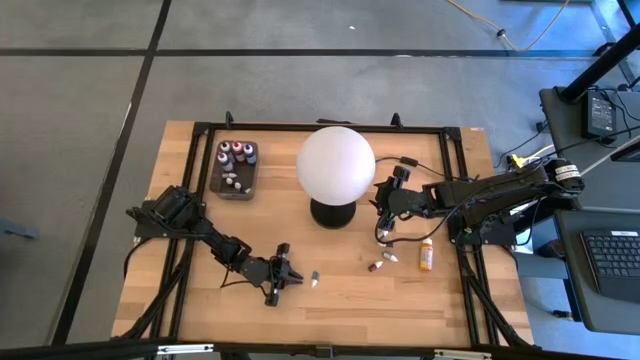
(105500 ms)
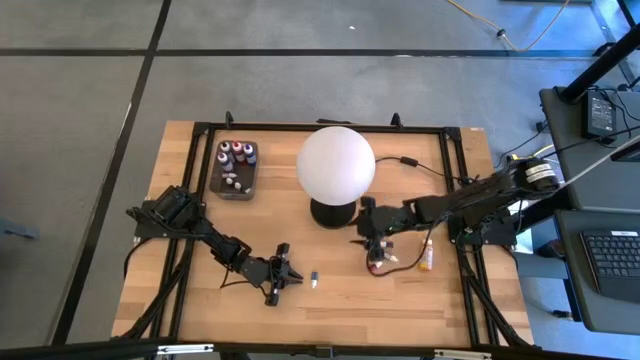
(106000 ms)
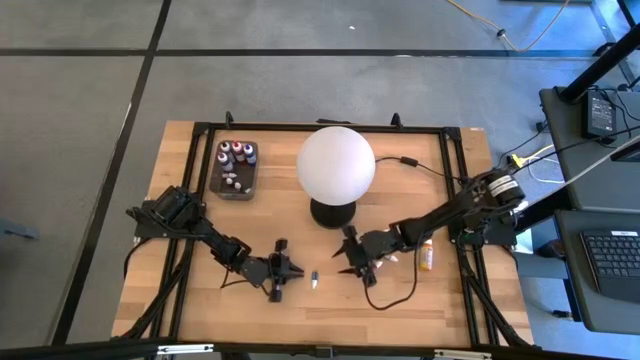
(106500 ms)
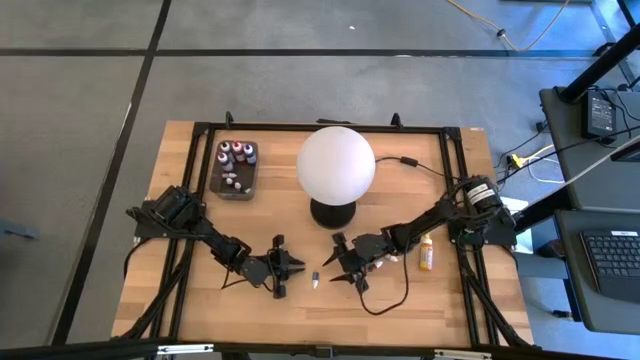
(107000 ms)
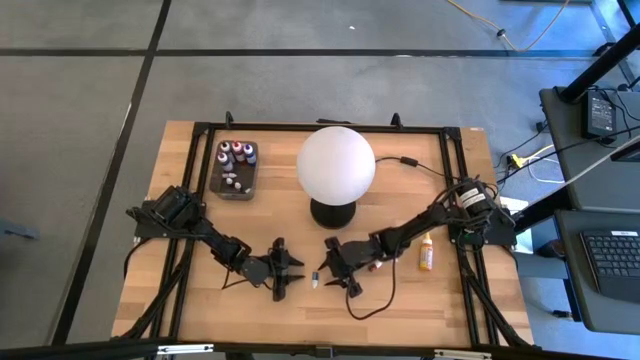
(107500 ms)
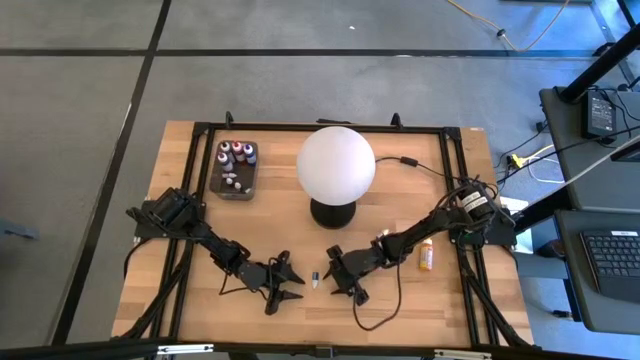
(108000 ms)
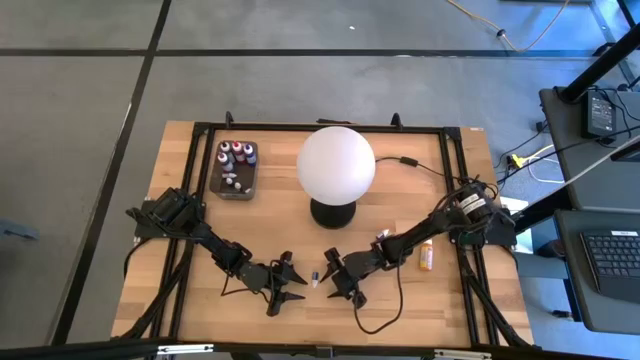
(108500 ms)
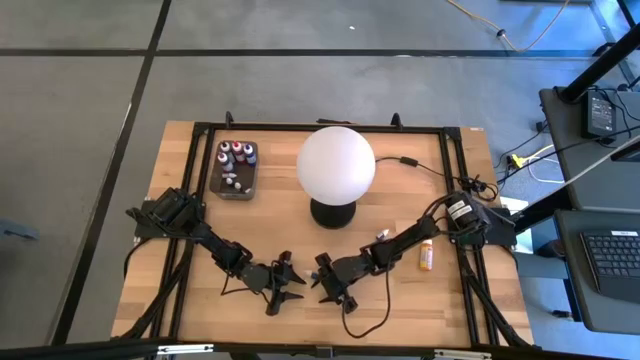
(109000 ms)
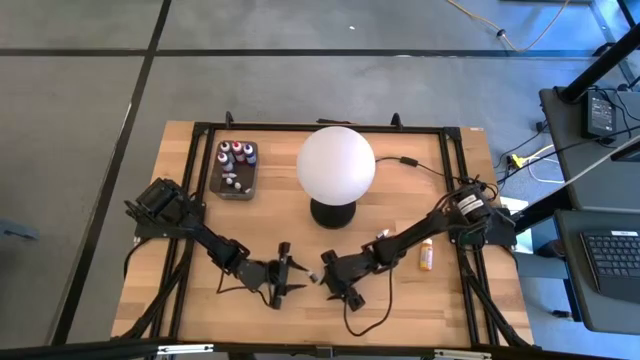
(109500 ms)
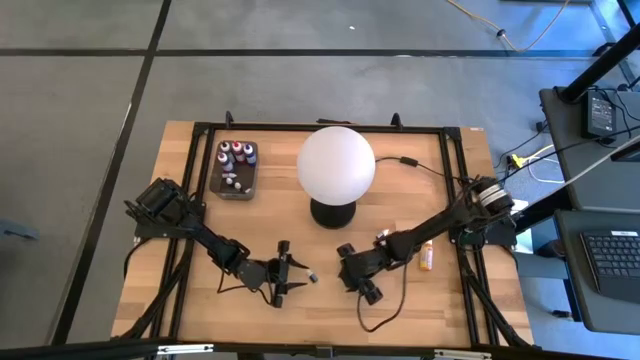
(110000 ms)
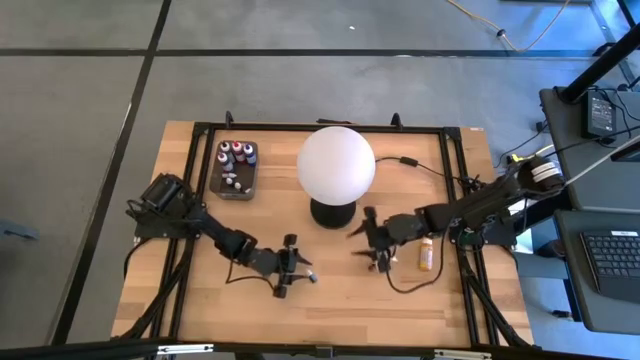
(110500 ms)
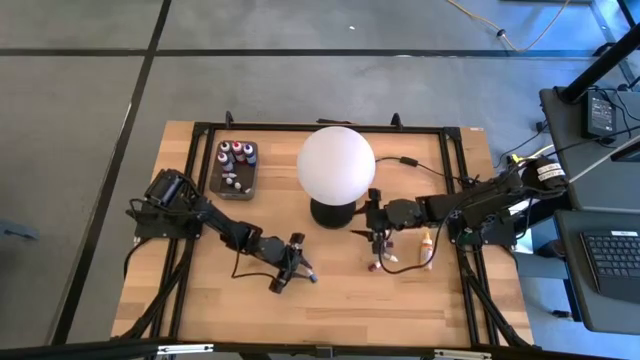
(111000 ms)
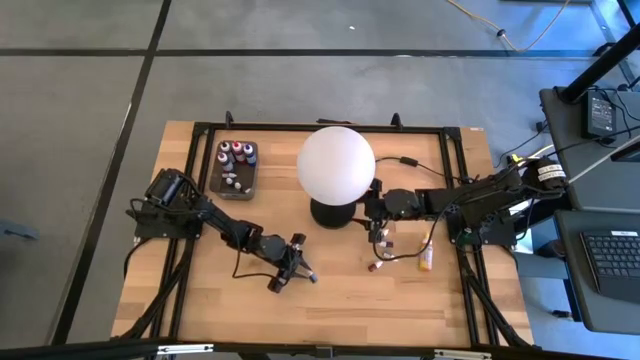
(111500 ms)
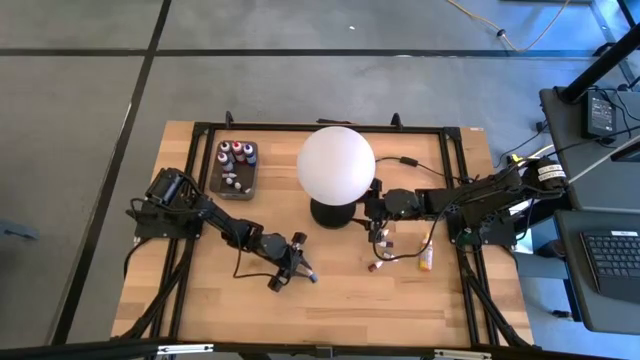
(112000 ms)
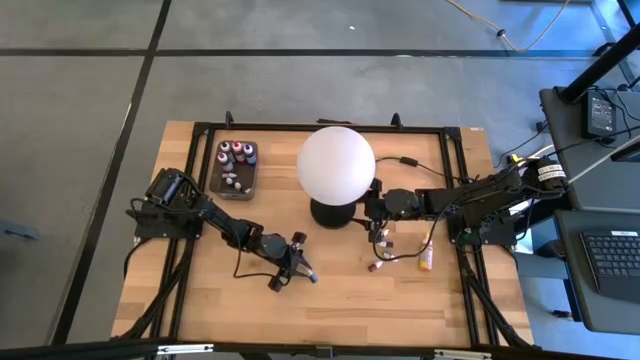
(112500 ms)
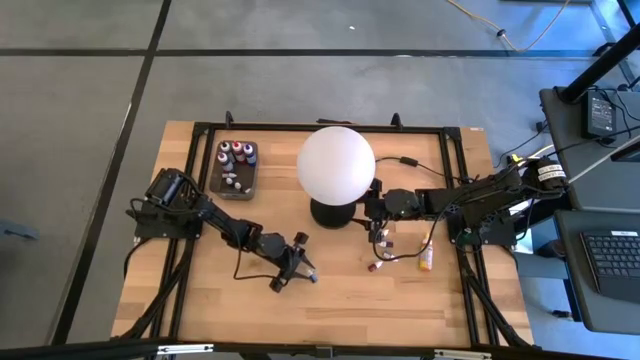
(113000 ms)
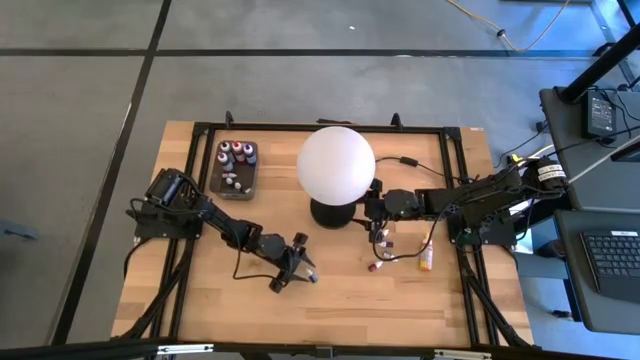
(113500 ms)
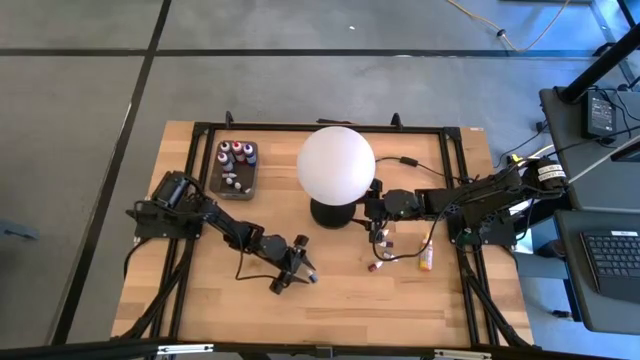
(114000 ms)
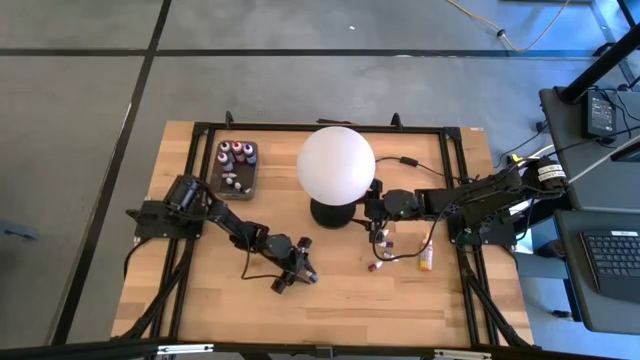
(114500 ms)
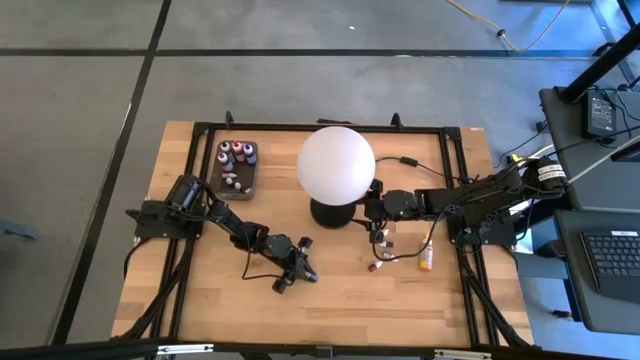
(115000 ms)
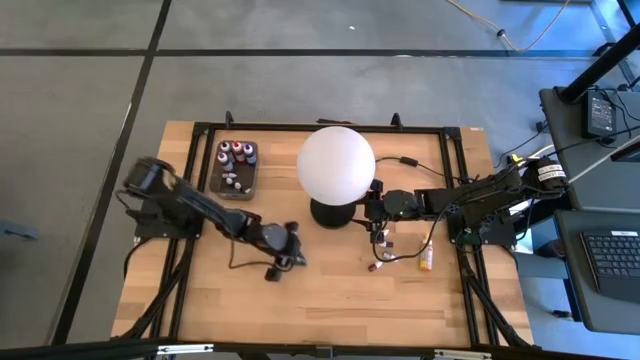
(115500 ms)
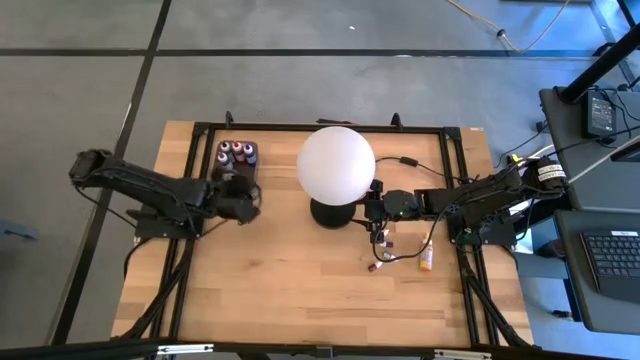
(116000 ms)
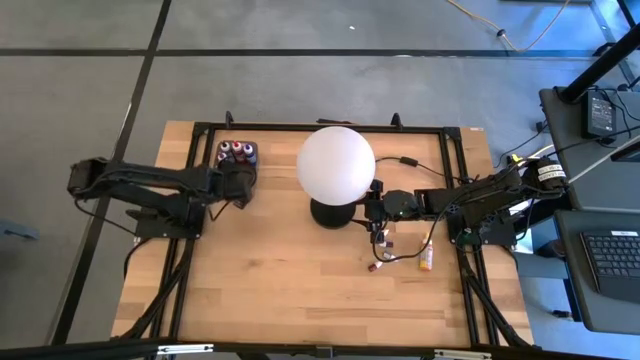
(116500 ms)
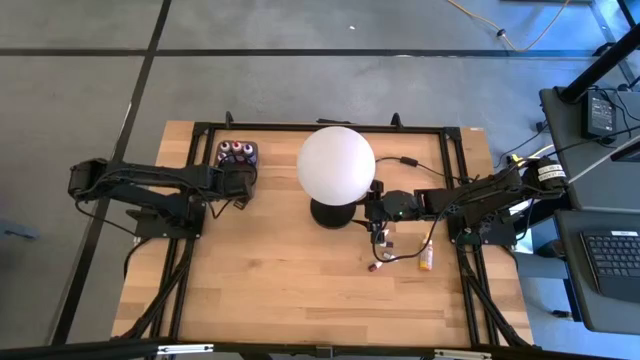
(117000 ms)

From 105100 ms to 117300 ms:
Task: Pick & Place food coloring
Put the small blue food coloring bottle into the black container

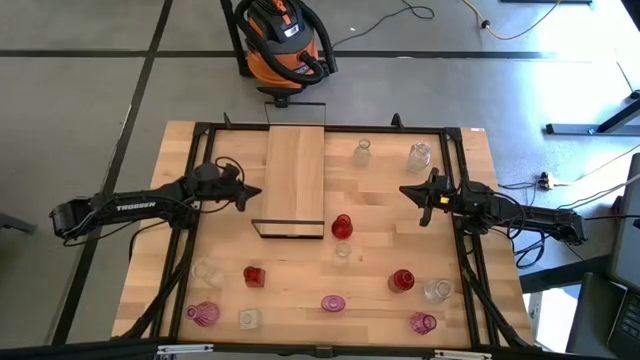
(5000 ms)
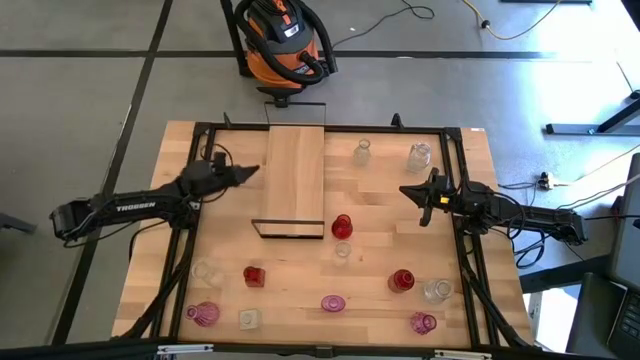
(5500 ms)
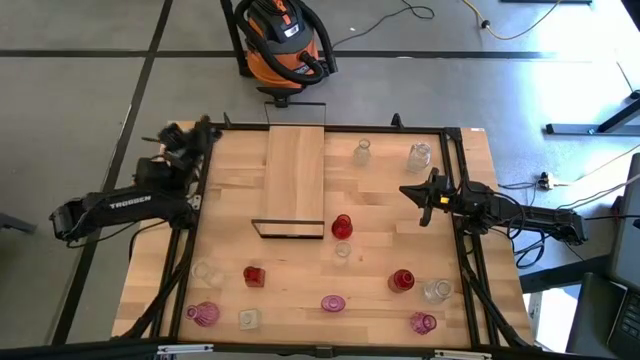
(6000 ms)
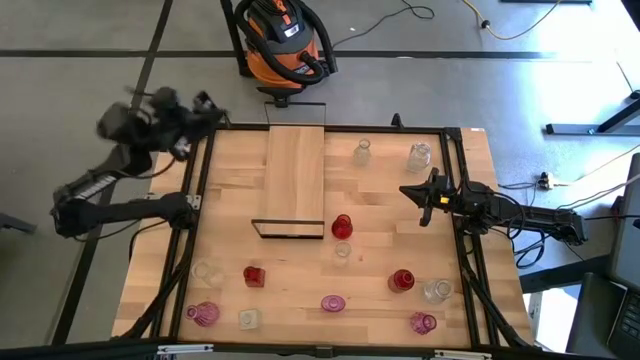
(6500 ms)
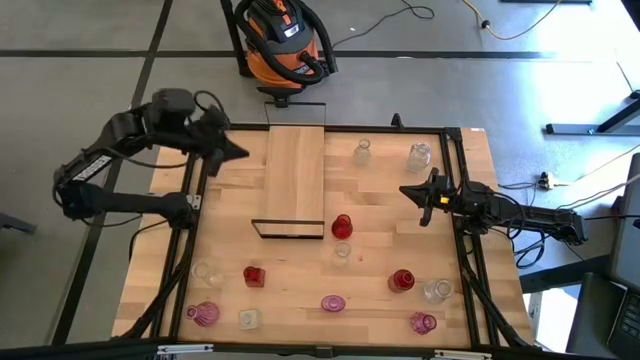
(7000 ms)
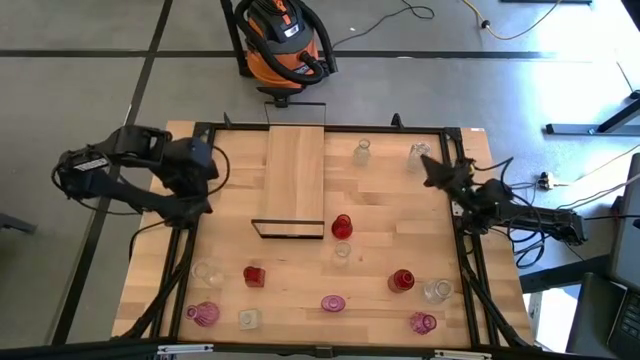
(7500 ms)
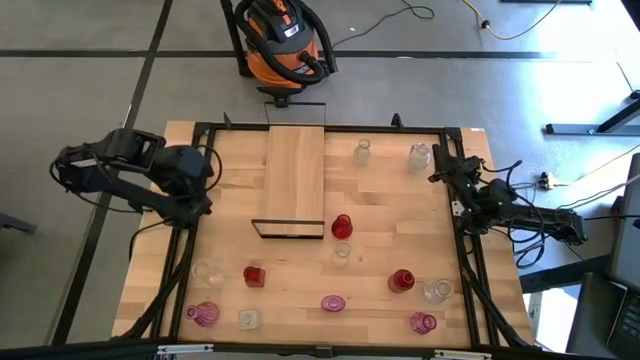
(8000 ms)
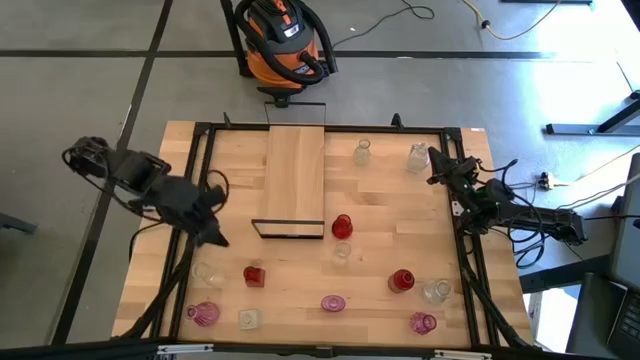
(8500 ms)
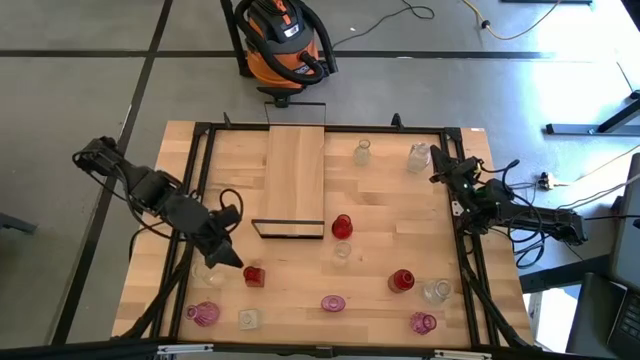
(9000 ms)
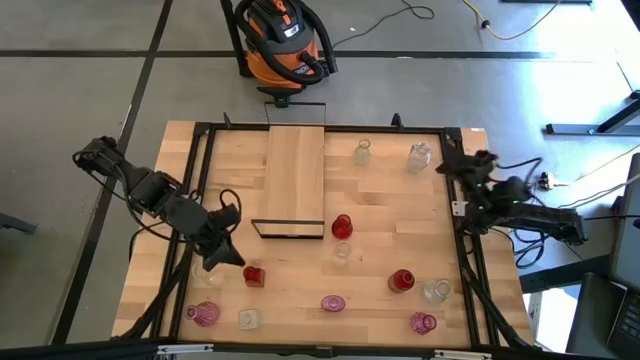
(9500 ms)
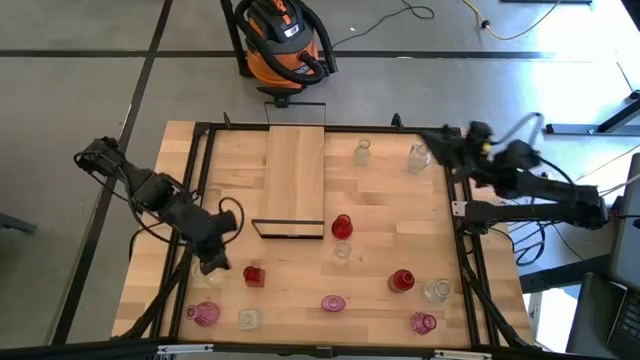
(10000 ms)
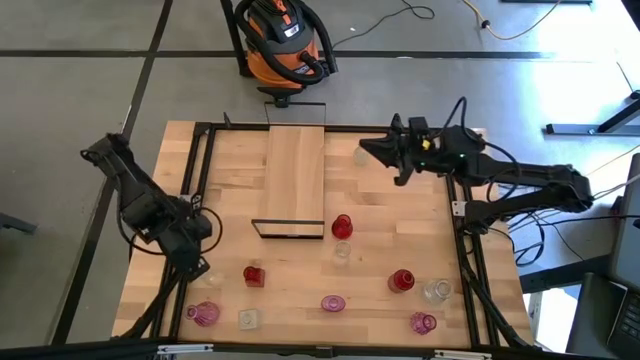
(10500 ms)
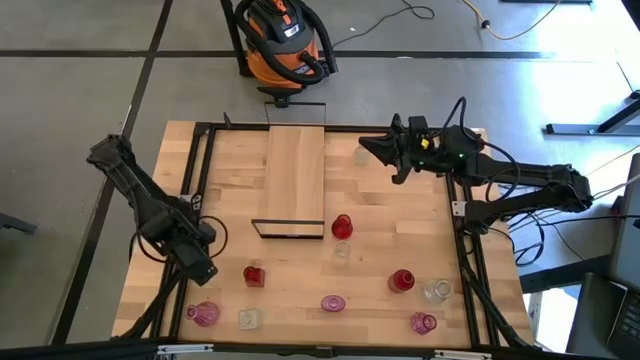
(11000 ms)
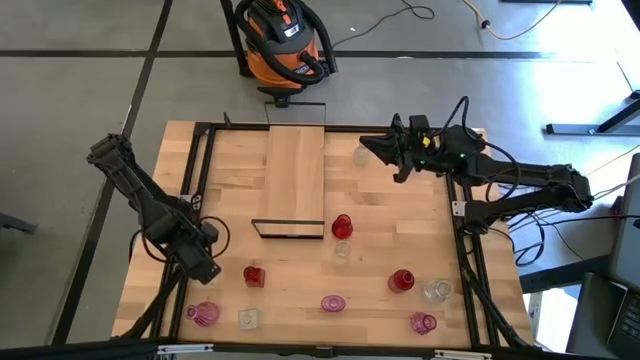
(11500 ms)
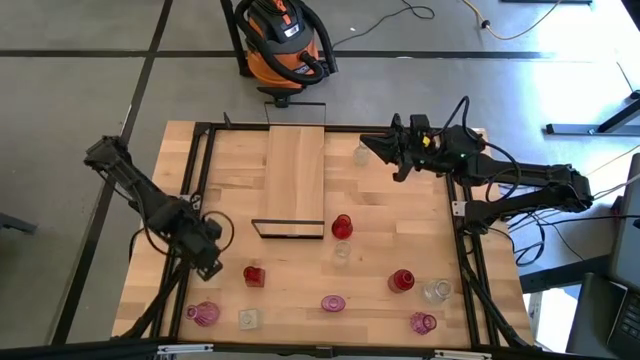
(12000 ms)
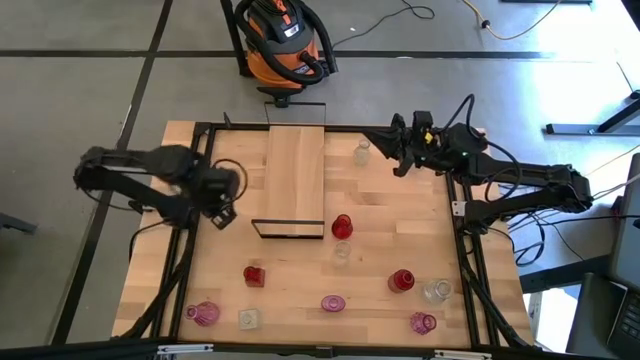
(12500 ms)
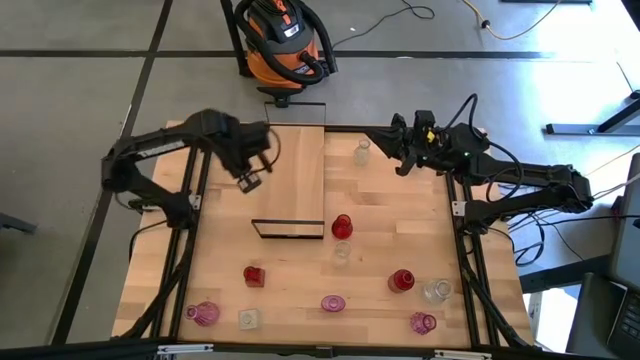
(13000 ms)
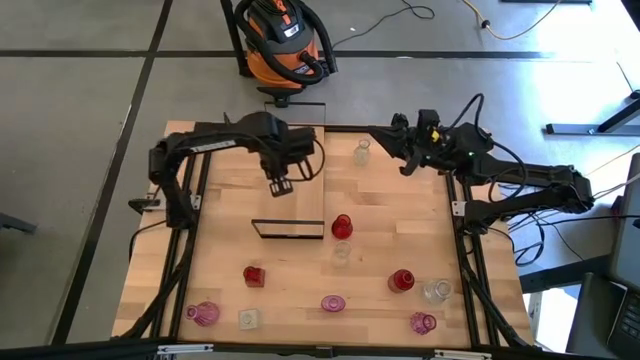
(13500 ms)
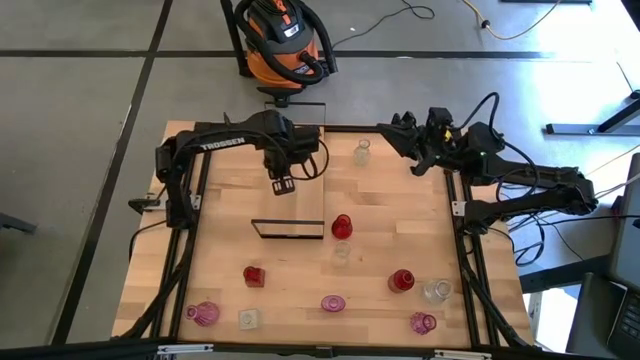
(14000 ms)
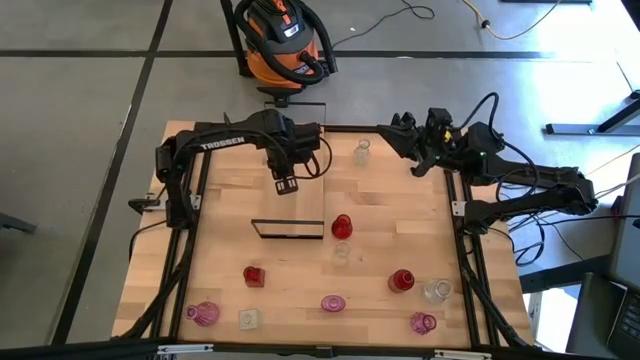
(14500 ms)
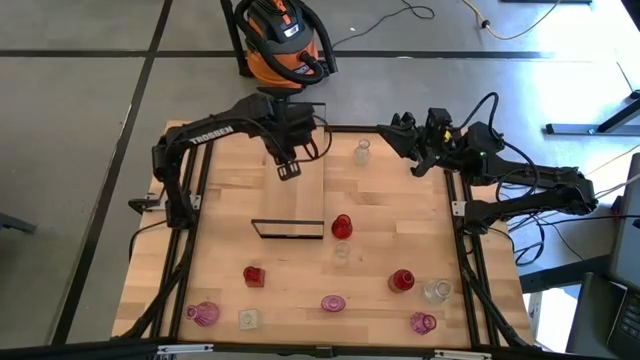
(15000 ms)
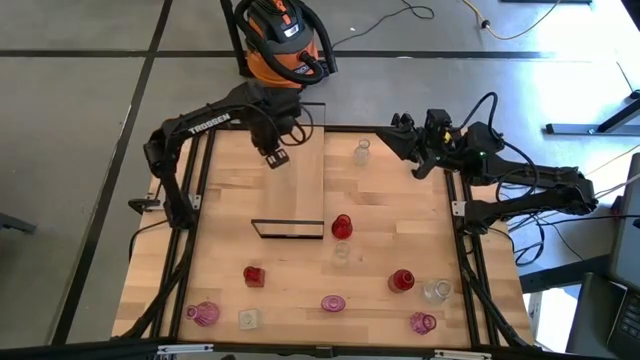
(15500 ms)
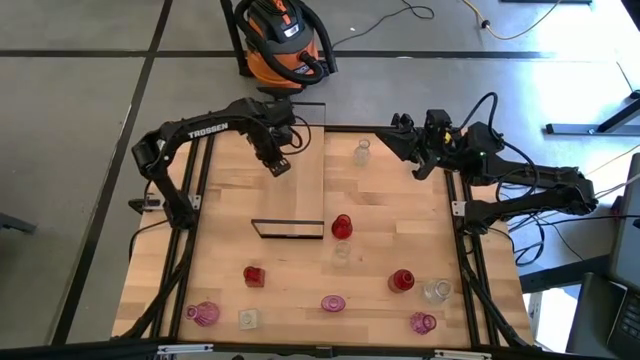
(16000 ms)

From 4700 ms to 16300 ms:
Task: sort vases onto shelf
Put the transparent vase on the shelf
